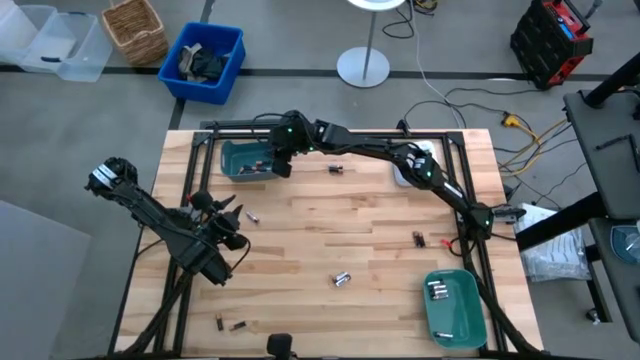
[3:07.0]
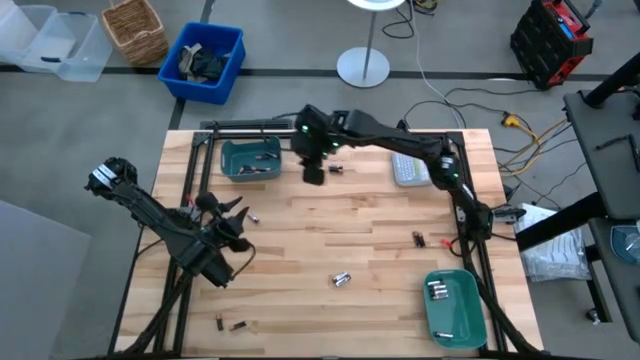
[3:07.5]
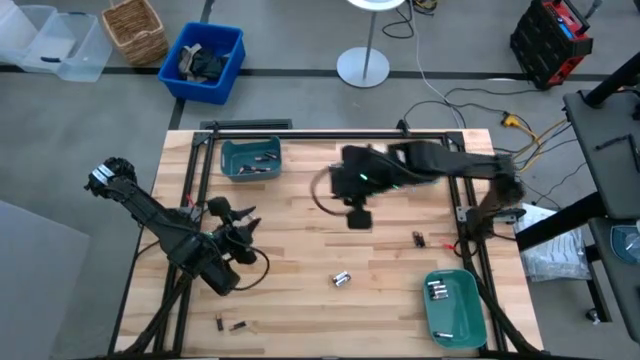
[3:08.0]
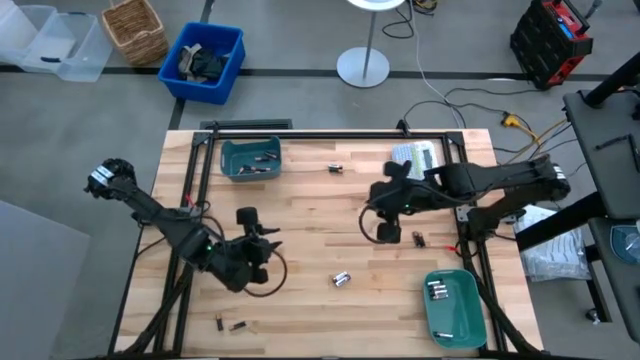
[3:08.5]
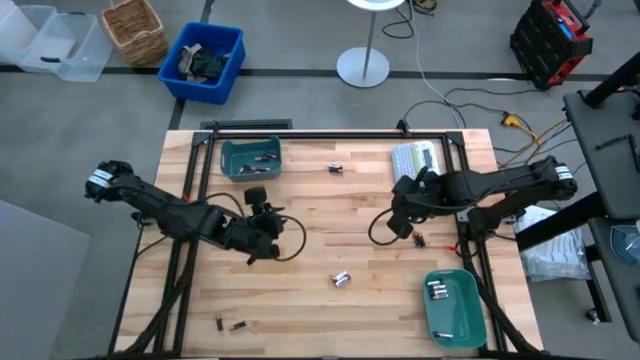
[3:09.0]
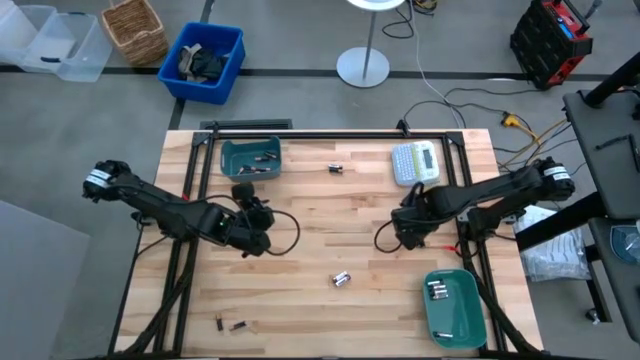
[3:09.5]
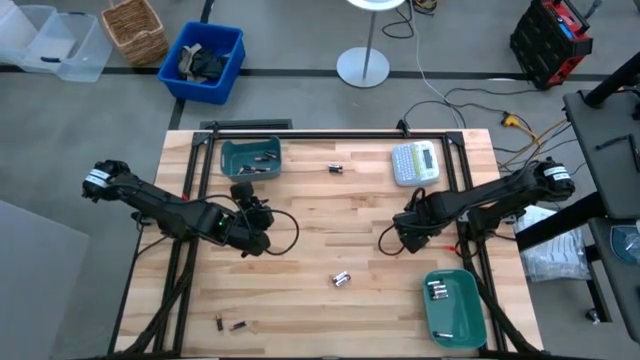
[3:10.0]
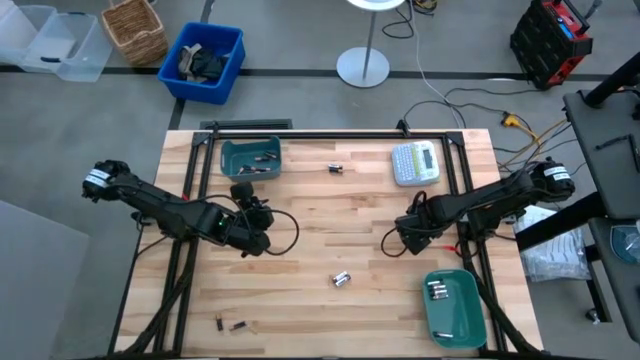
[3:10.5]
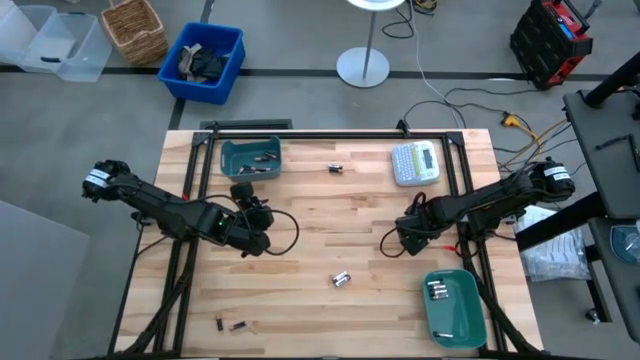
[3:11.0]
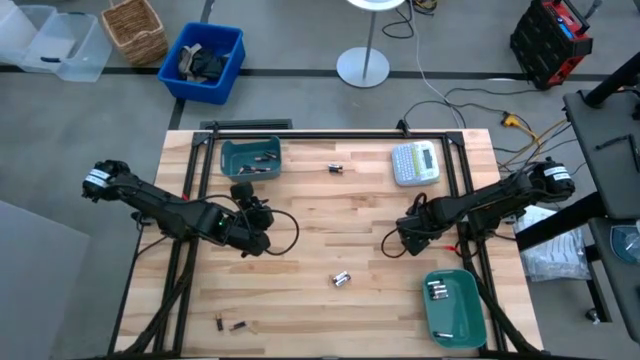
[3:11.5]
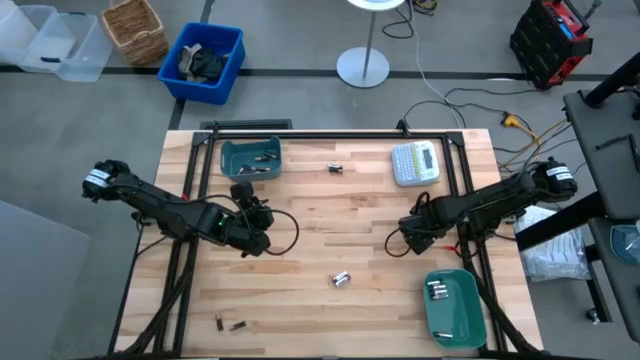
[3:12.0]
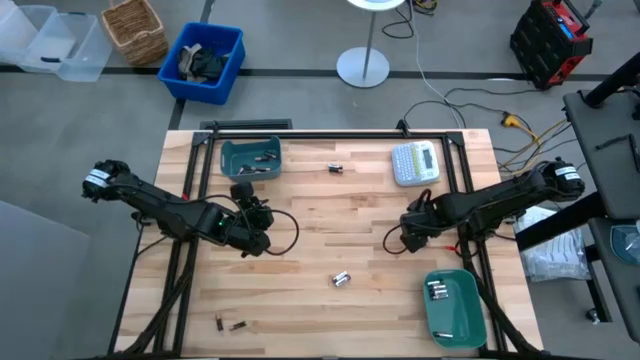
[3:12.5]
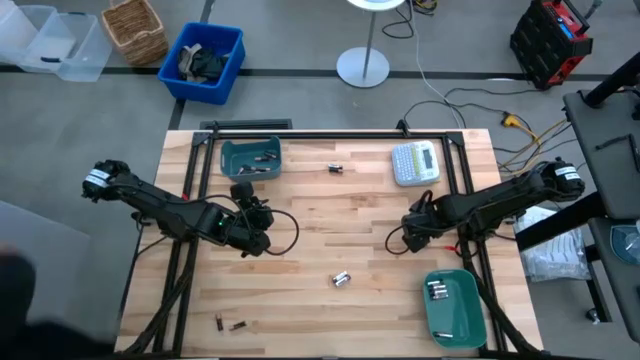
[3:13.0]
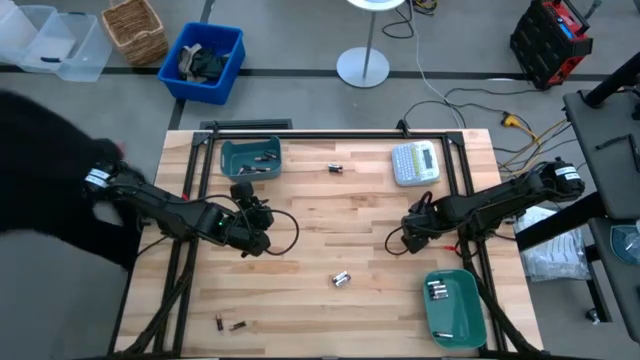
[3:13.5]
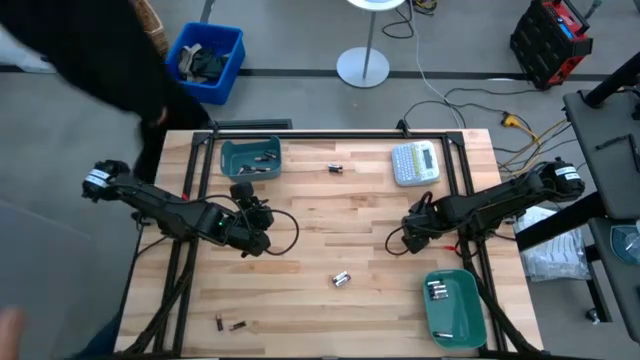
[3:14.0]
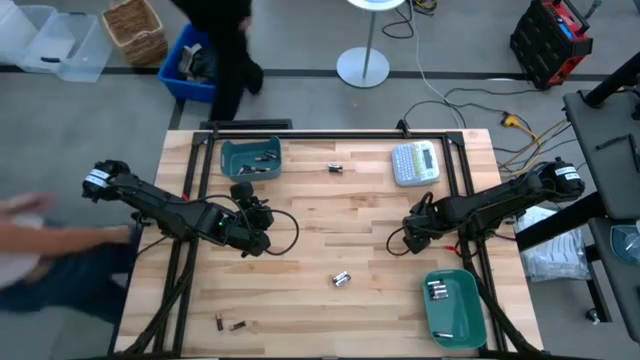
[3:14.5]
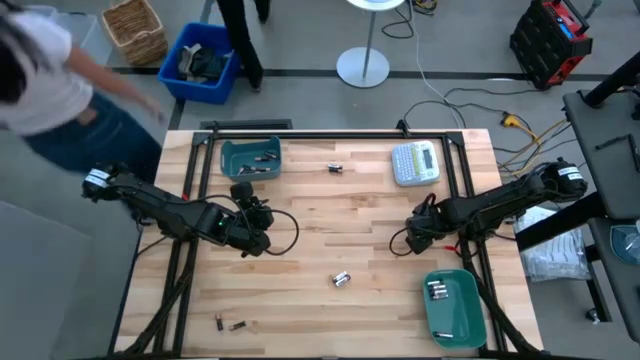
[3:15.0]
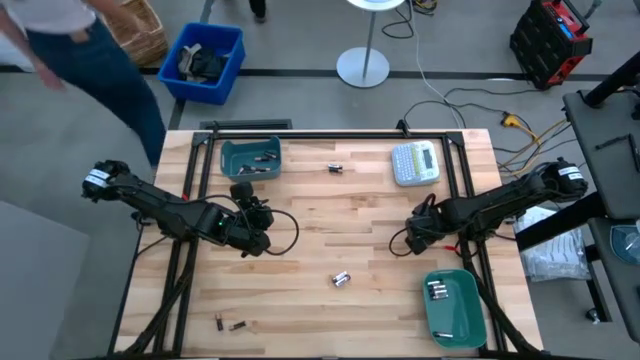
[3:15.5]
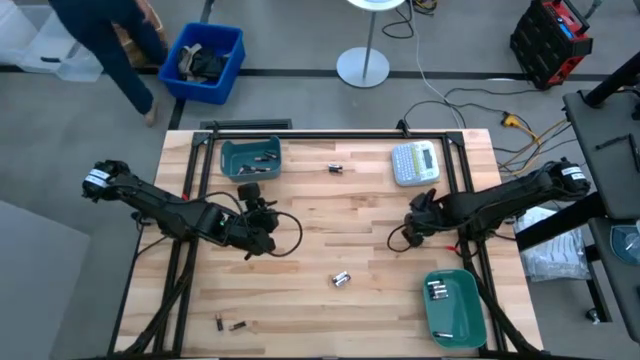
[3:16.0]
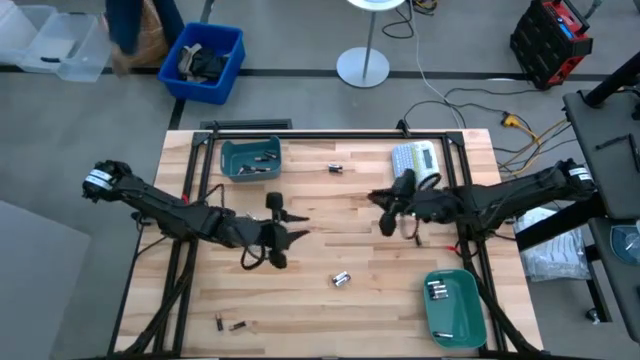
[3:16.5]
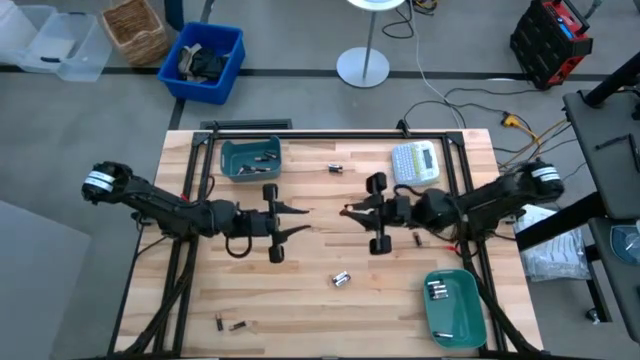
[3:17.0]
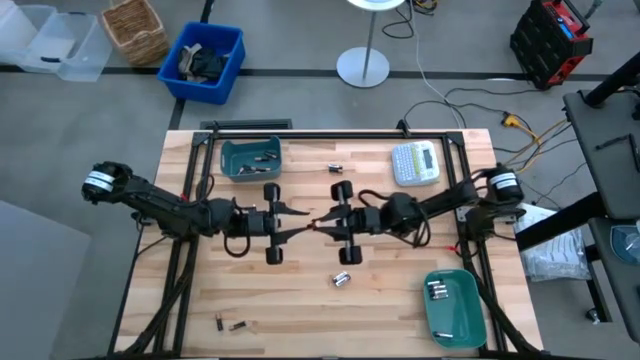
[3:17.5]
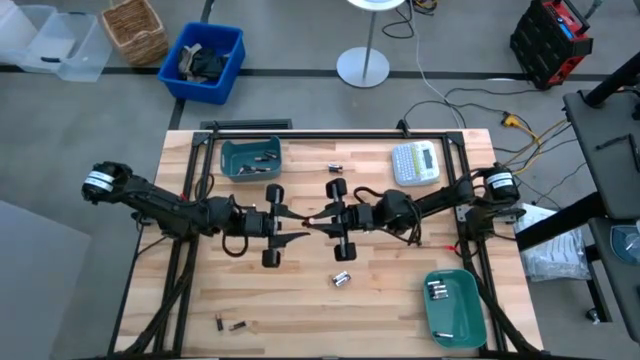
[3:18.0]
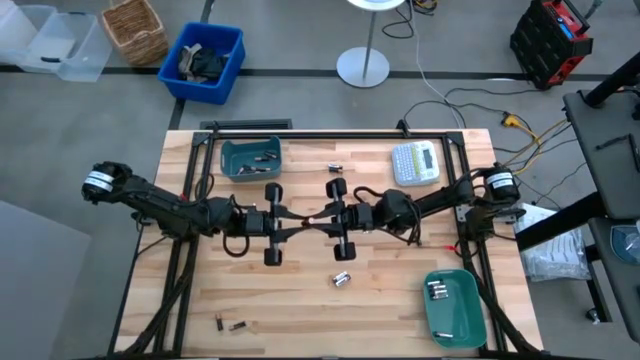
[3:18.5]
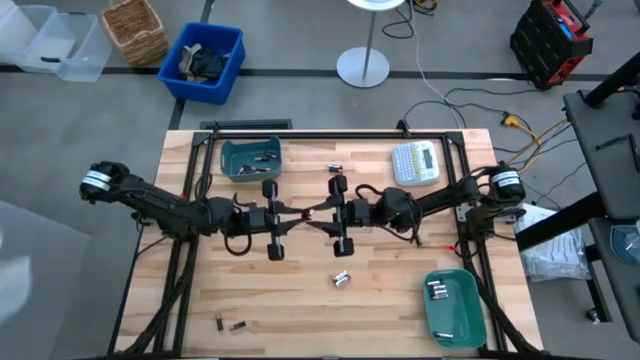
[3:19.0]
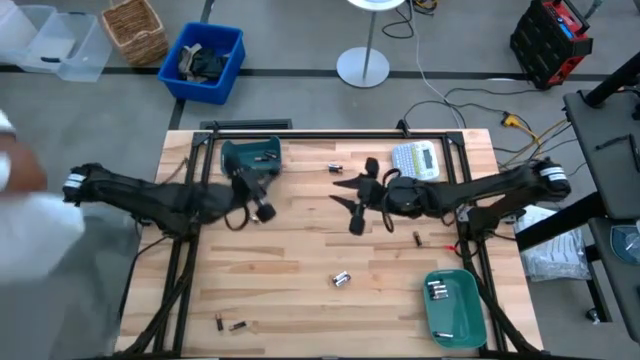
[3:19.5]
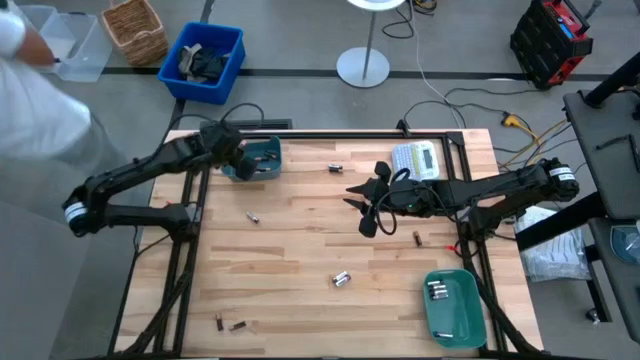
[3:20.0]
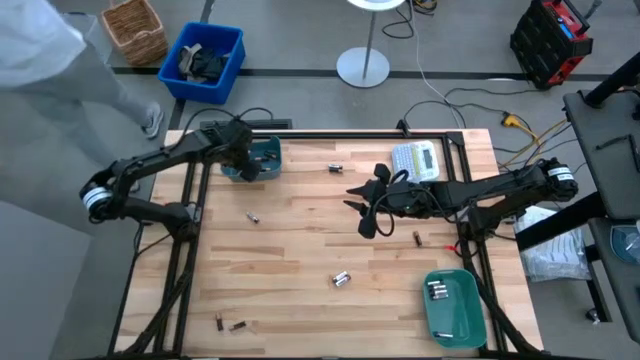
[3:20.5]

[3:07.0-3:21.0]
Task: Sort batteries
Put the black battery into the blue bin

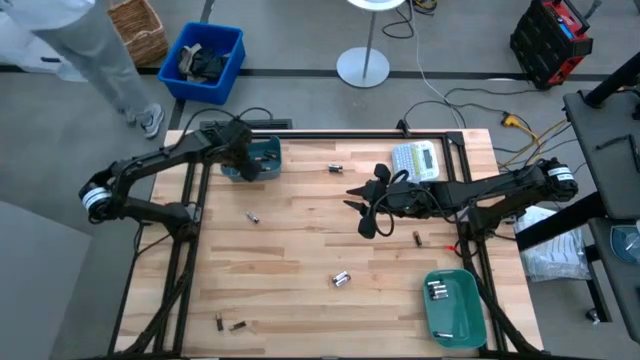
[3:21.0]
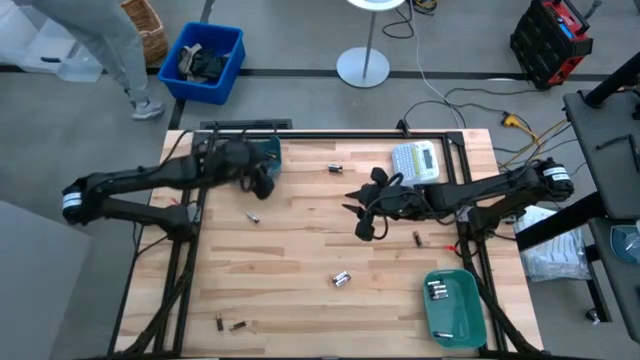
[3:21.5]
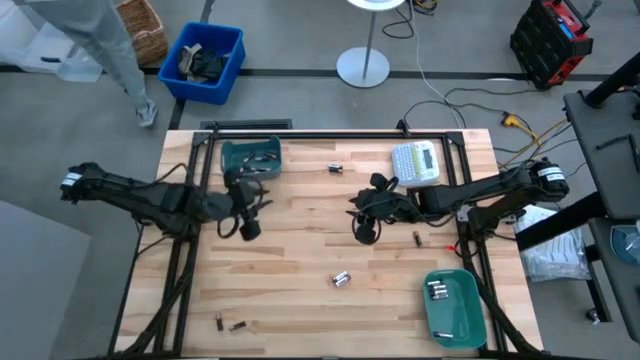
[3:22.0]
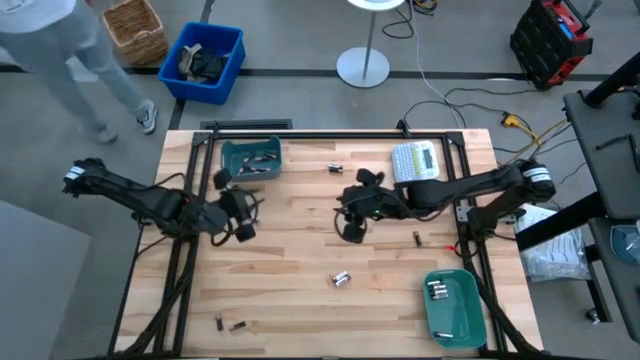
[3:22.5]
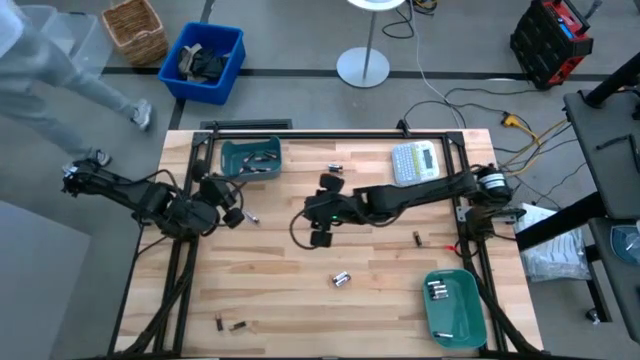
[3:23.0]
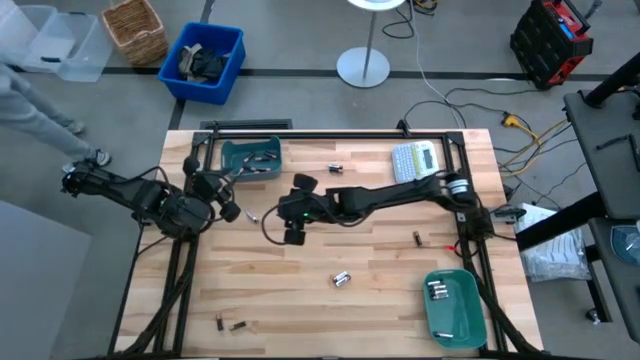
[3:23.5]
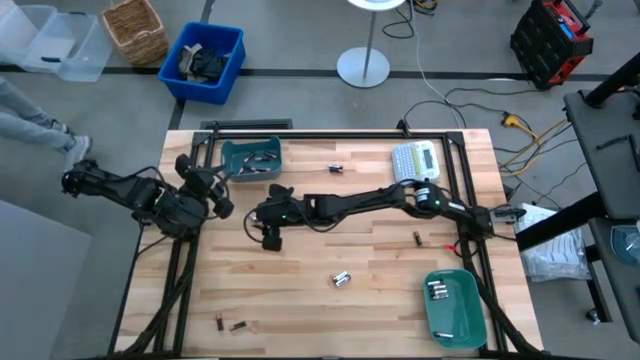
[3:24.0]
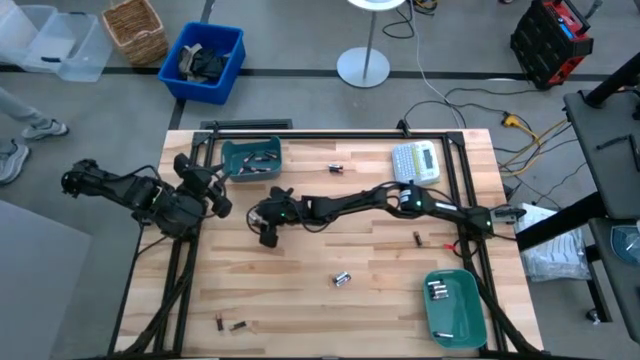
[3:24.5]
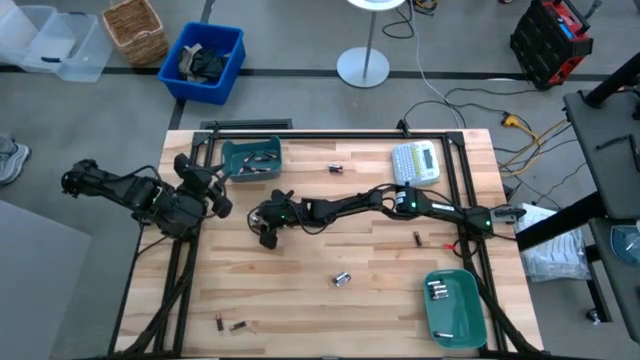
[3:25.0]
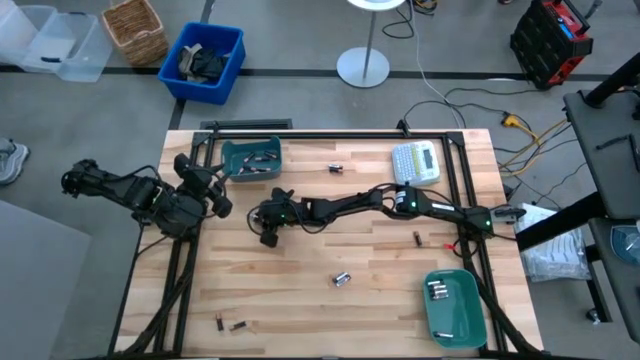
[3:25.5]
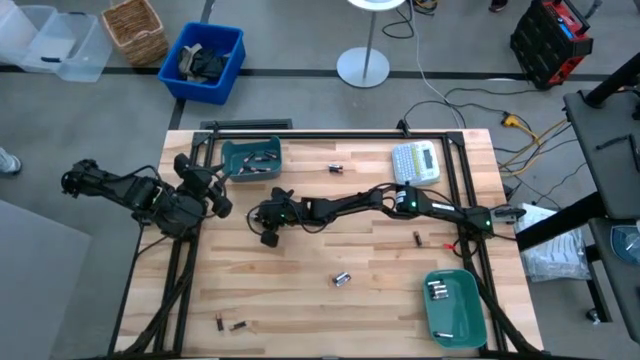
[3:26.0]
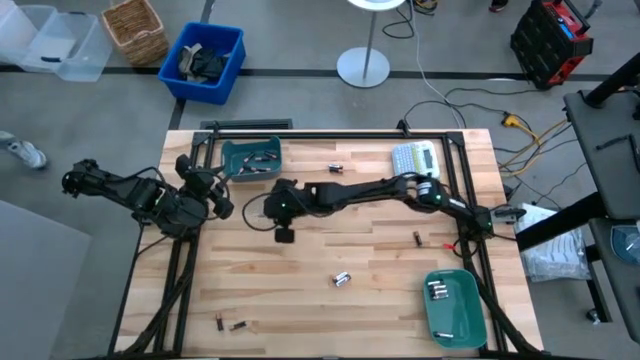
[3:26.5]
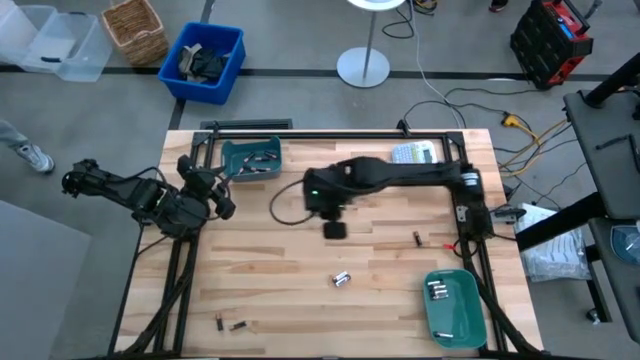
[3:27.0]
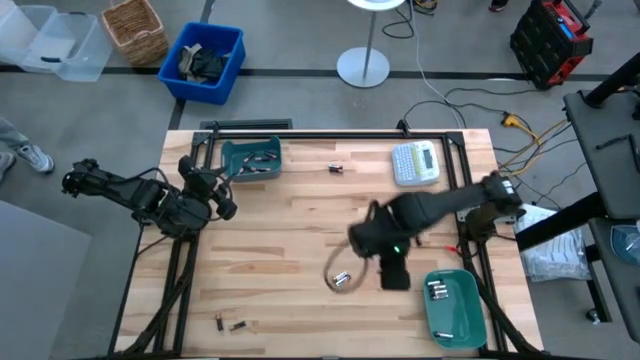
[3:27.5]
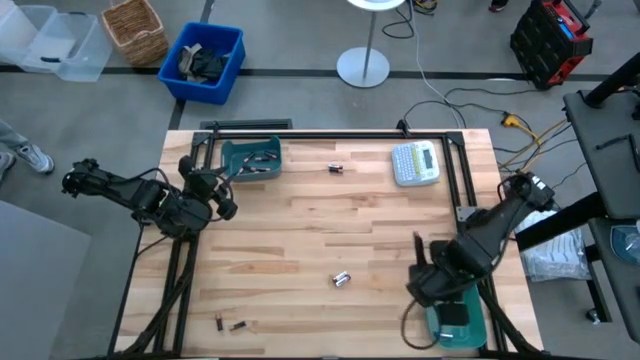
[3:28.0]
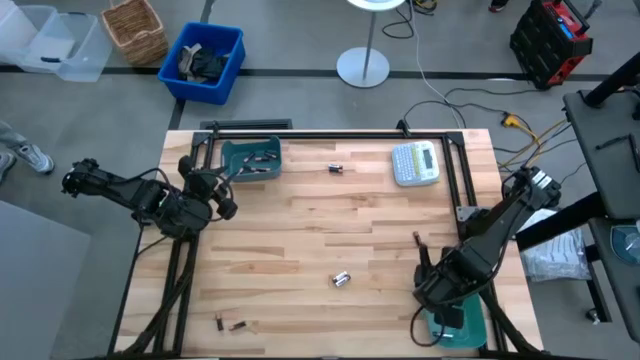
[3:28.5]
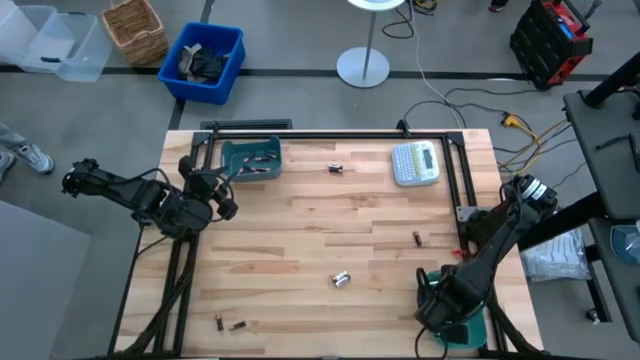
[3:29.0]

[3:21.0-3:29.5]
Put the silver battery into the green bin
